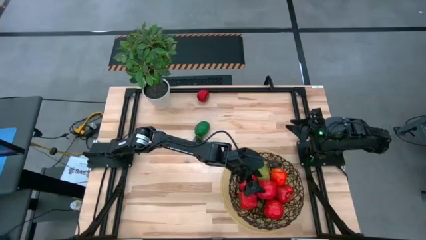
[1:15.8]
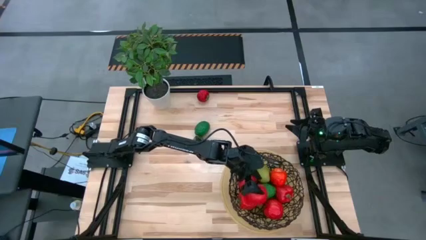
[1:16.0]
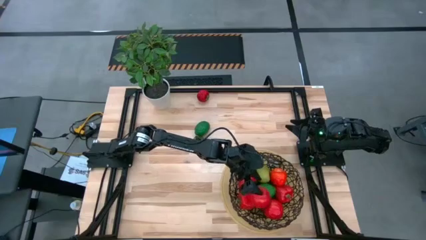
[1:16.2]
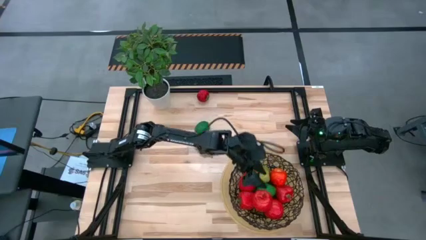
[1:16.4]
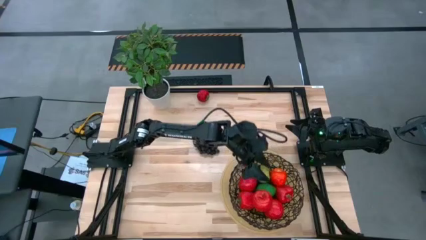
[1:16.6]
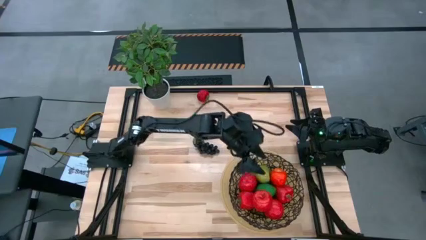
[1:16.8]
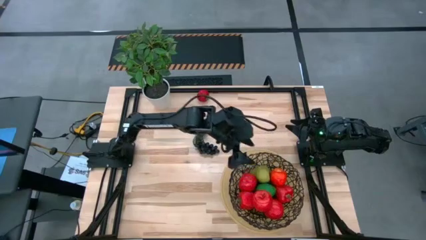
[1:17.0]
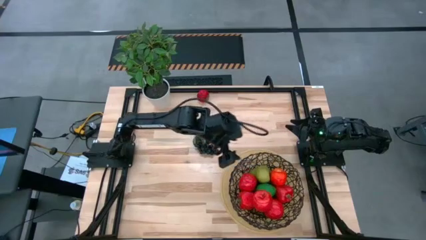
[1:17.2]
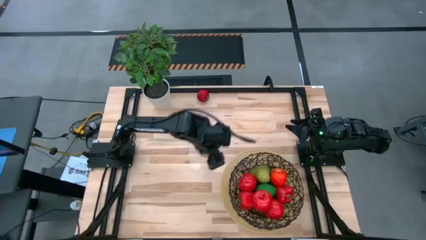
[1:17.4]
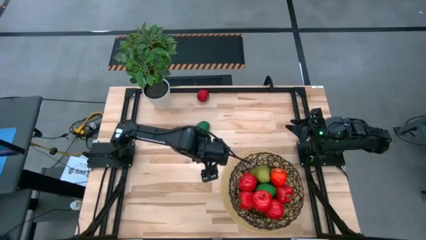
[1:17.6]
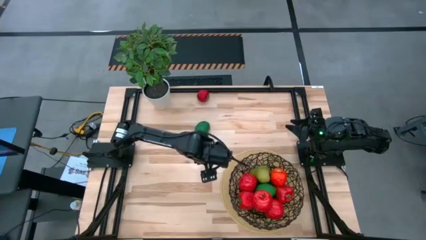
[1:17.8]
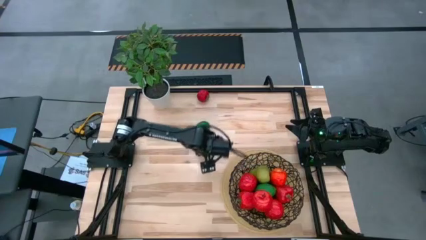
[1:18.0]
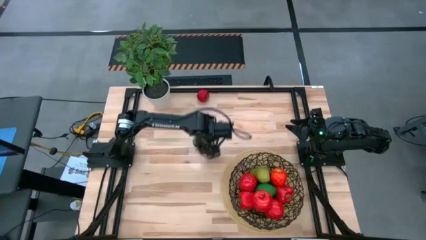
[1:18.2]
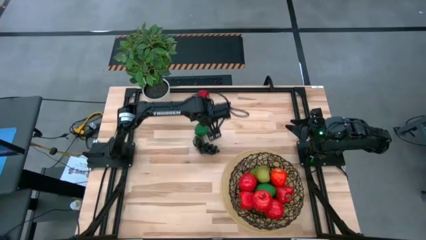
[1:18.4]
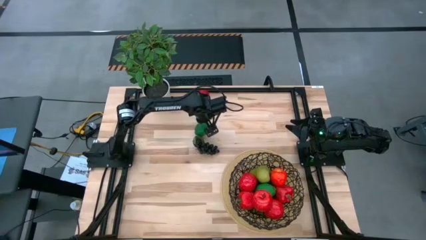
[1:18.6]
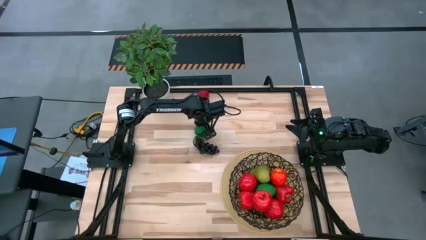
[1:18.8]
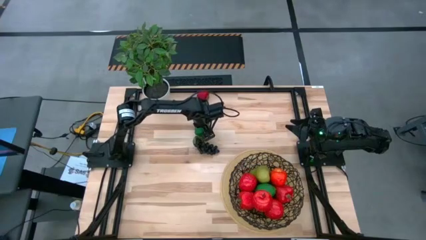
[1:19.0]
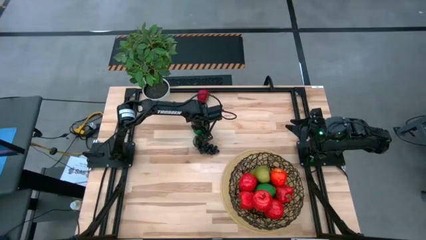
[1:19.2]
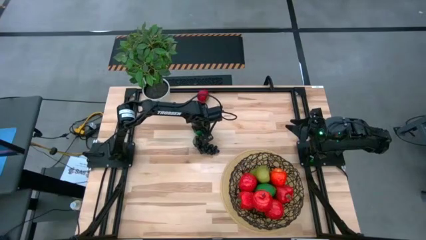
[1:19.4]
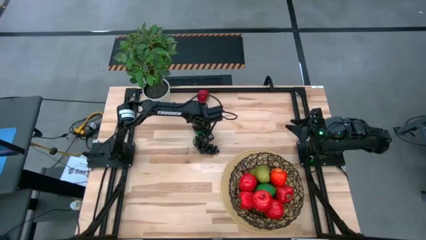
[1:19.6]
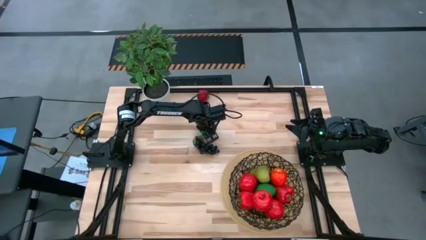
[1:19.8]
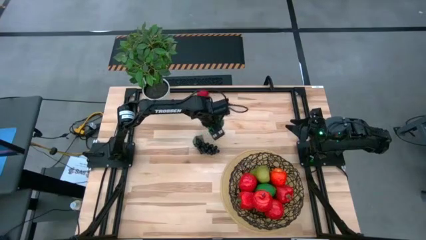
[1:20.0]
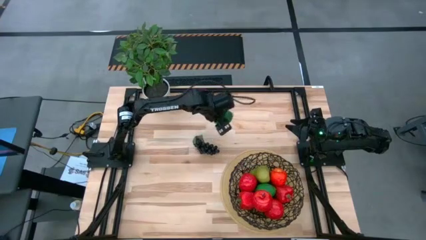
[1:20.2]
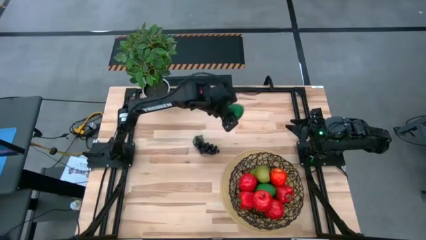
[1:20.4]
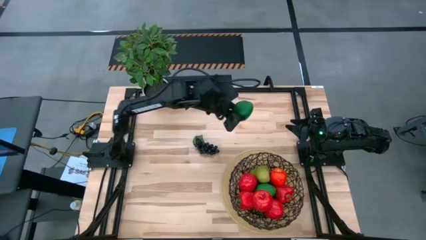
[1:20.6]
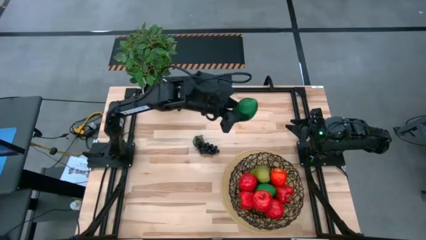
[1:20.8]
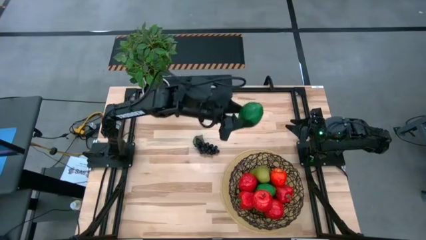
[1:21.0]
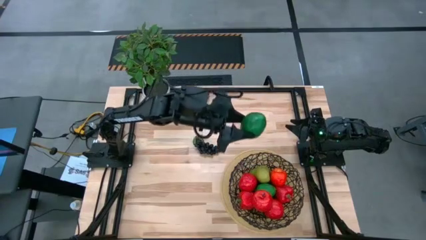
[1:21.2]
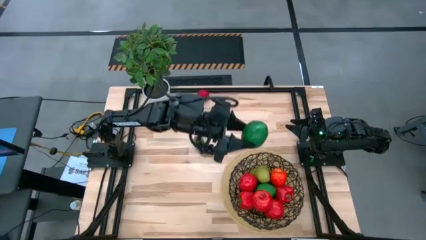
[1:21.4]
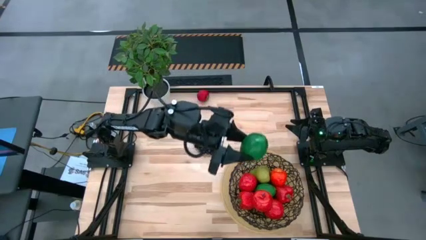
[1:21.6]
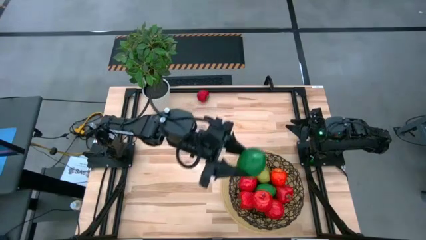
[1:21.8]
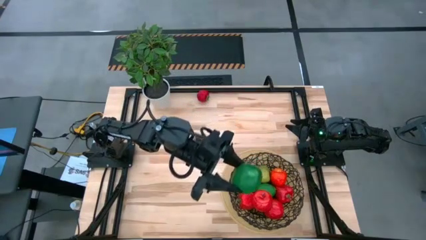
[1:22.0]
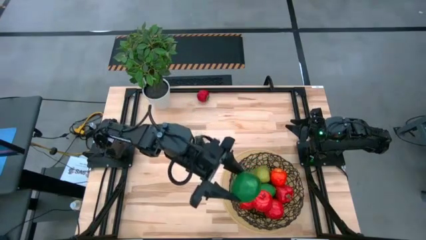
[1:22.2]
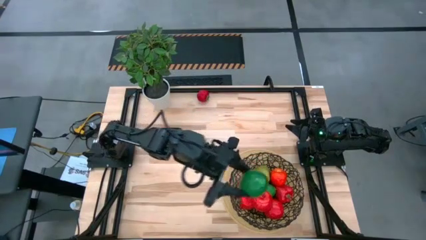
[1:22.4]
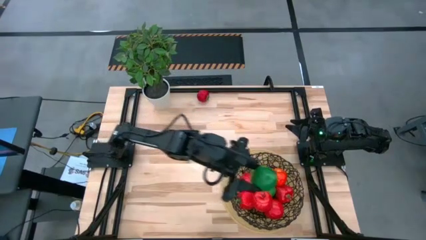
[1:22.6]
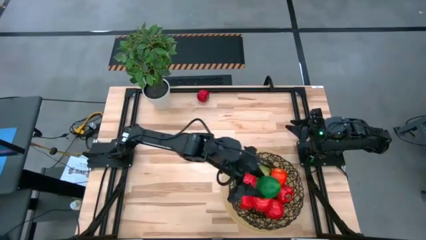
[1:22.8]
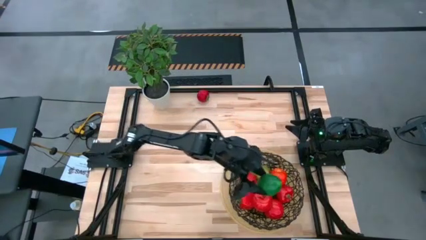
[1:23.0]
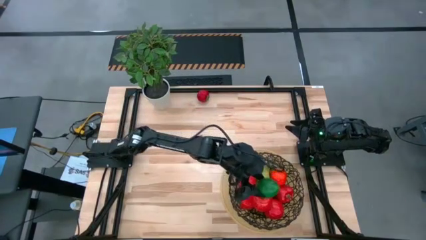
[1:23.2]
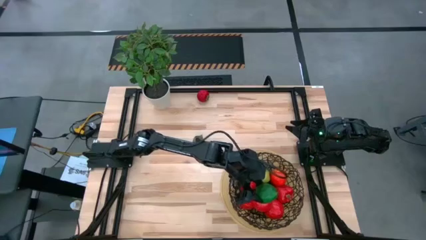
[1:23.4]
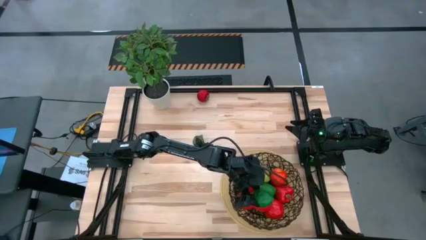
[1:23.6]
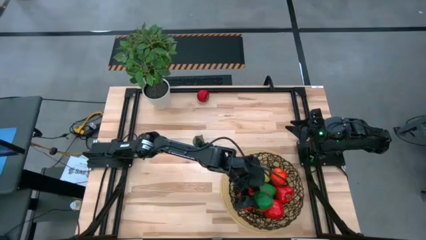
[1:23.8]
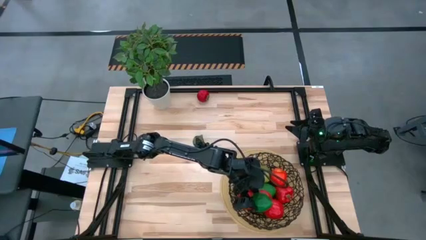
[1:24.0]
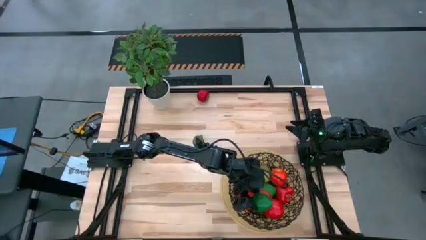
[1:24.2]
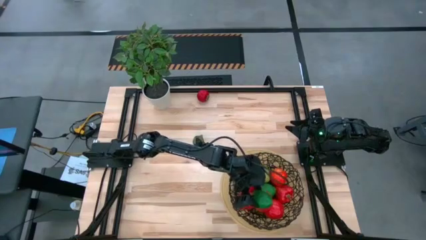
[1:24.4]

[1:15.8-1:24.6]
Task: Build produce basket
Put the green lime into the black wire basket

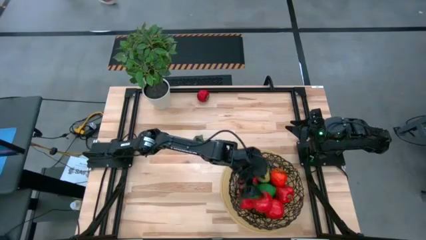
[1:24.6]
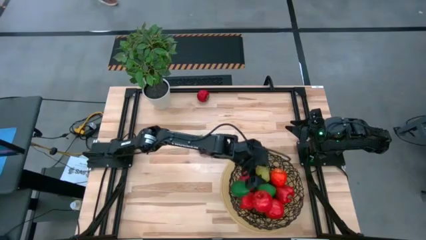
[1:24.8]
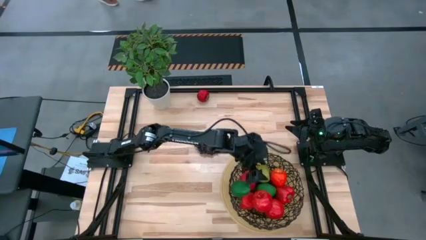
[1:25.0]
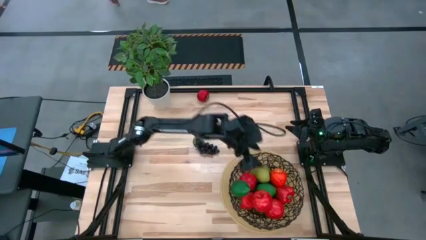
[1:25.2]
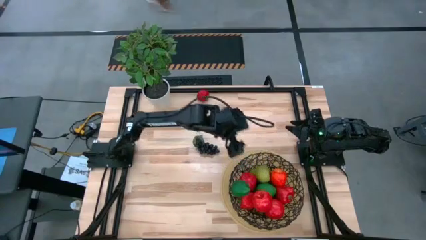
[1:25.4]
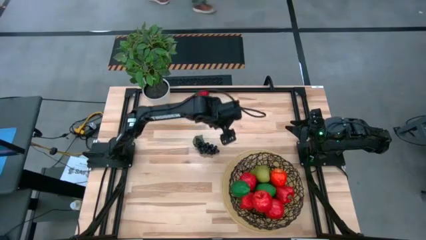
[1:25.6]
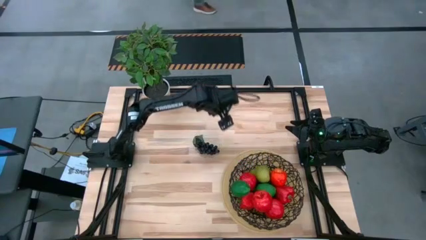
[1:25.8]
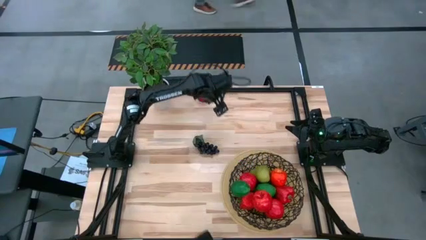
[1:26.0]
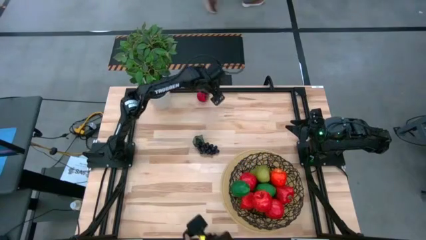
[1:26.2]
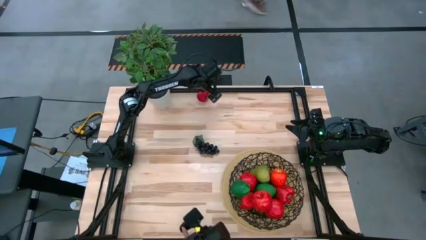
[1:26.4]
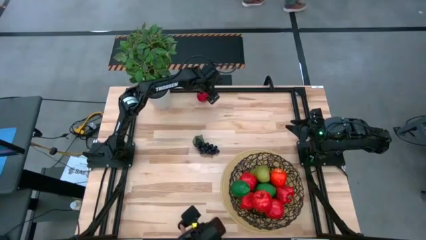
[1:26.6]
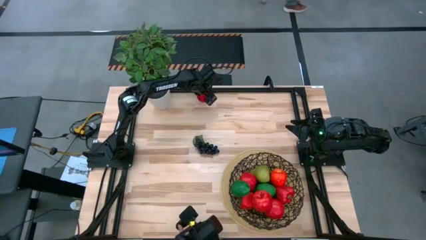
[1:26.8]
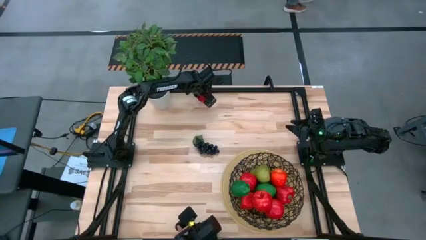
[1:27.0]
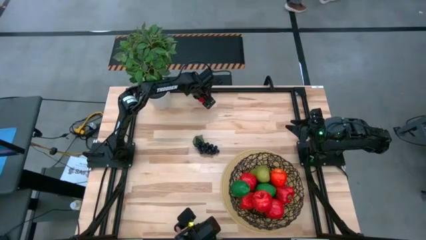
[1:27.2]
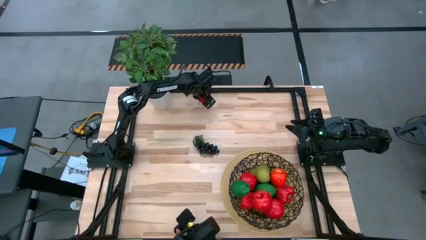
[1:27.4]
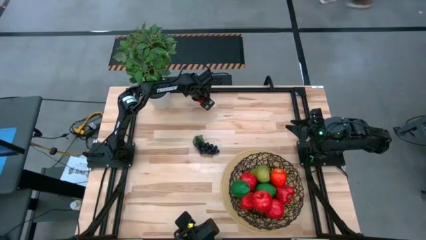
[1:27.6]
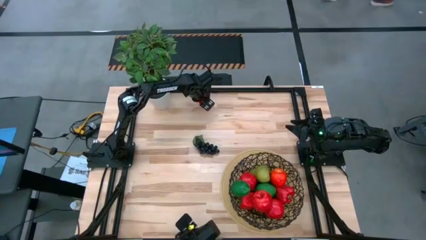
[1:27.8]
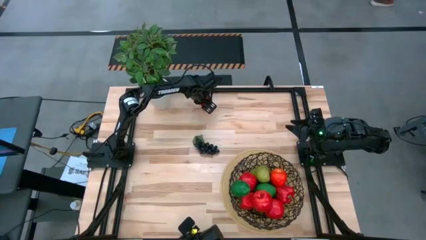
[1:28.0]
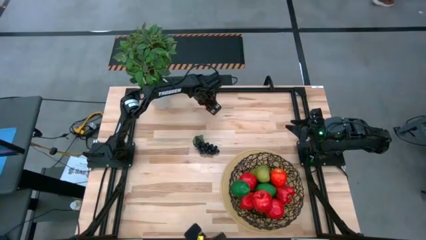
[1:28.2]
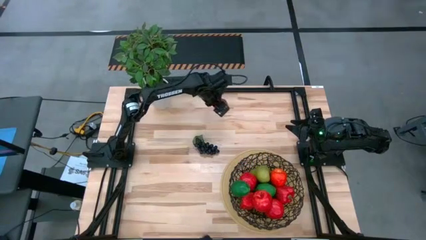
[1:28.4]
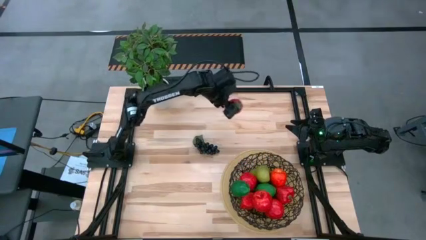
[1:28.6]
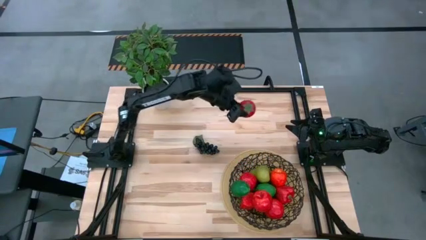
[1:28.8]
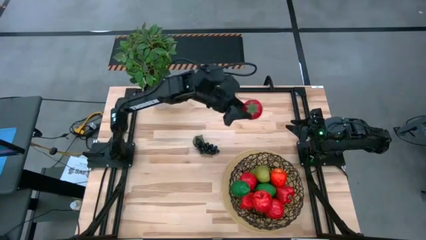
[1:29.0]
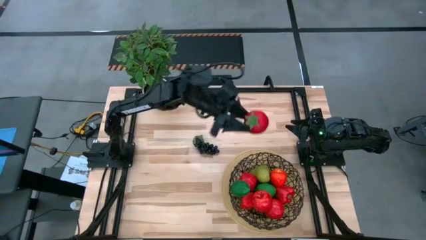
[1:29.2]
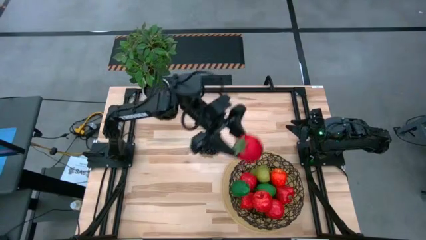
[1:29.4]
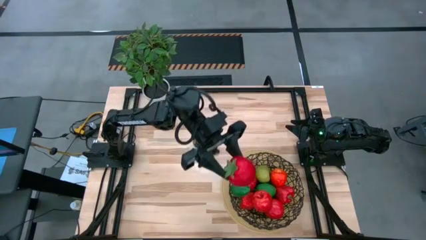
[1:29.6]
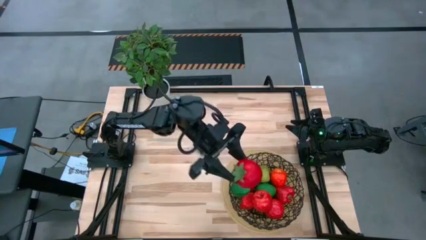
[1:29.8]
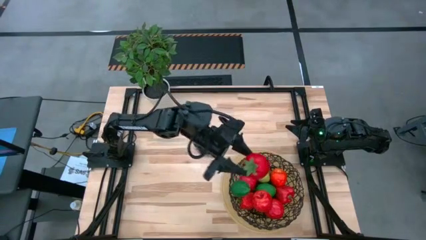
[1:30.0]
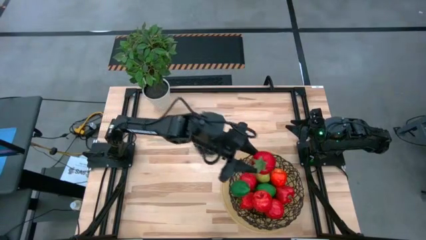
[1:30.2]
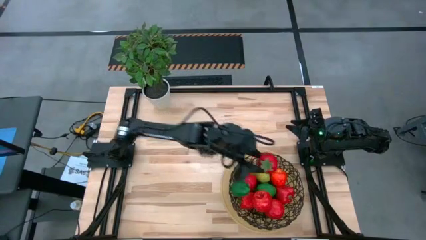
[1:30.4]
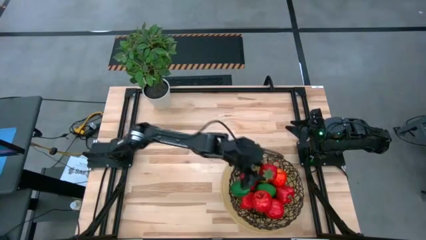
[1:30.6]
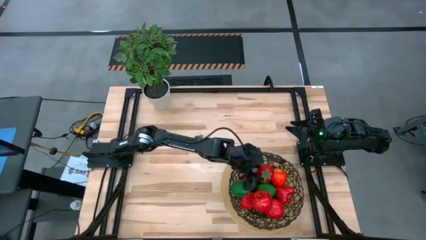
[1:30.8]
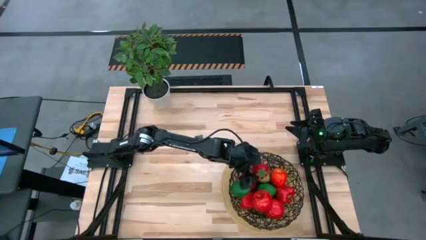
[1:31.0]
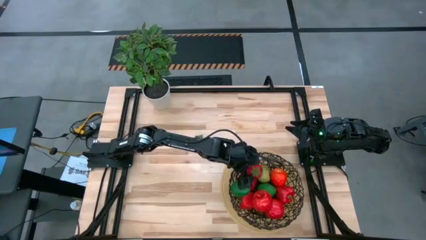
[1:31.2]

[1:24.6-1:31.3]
Put the red tomato into the black wire basket
